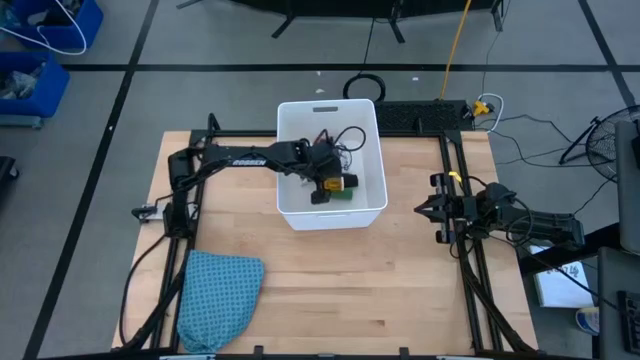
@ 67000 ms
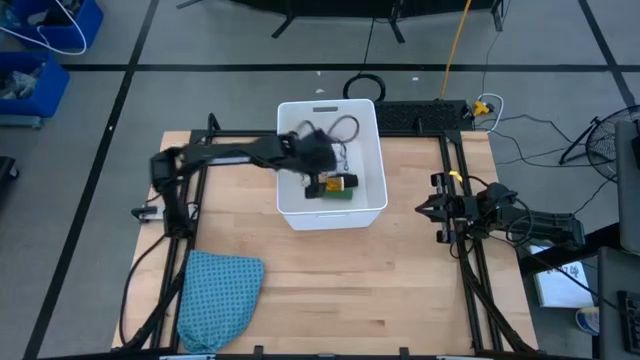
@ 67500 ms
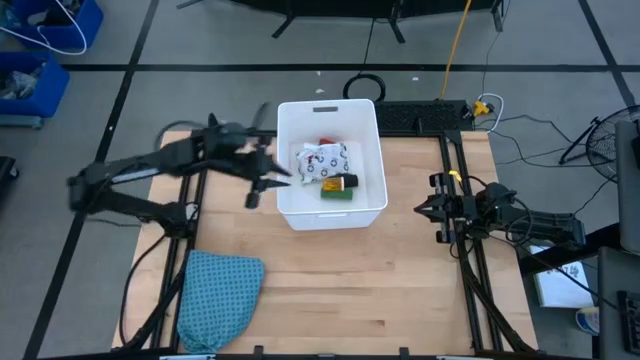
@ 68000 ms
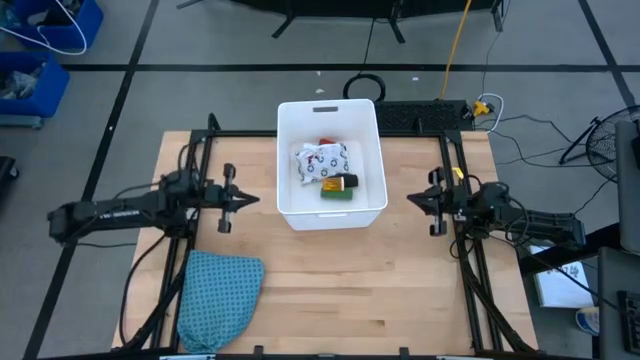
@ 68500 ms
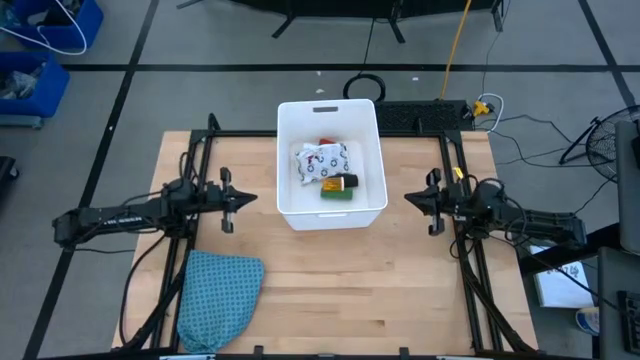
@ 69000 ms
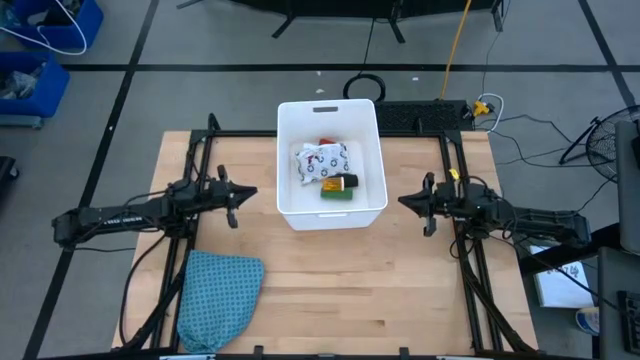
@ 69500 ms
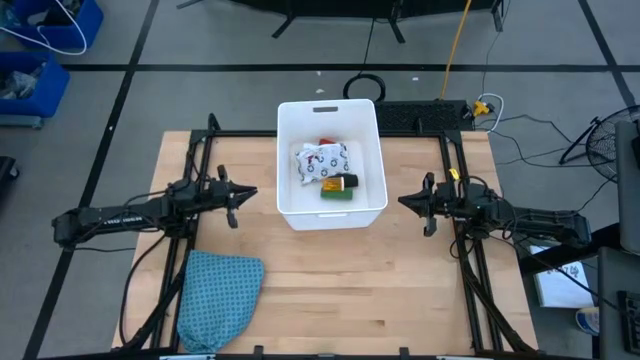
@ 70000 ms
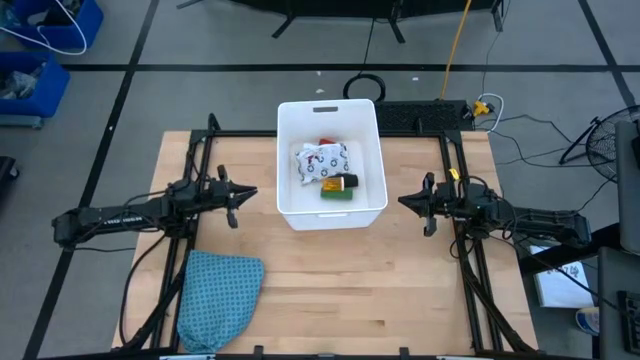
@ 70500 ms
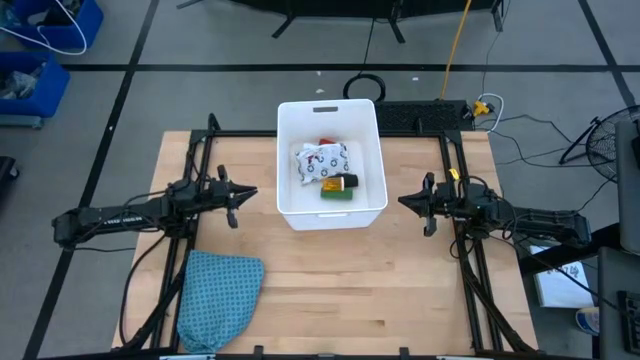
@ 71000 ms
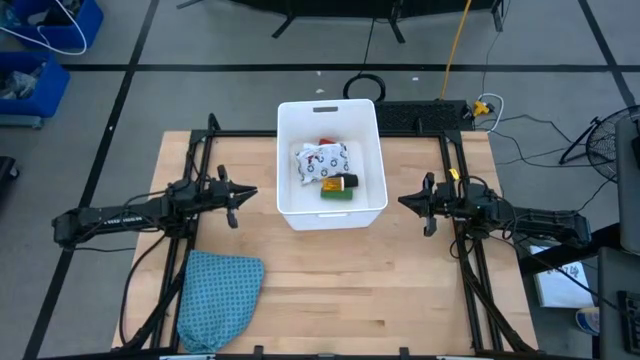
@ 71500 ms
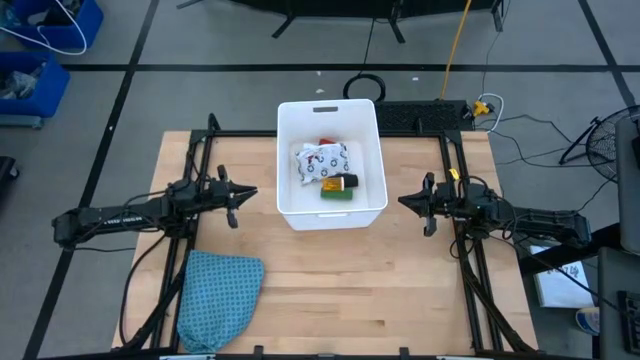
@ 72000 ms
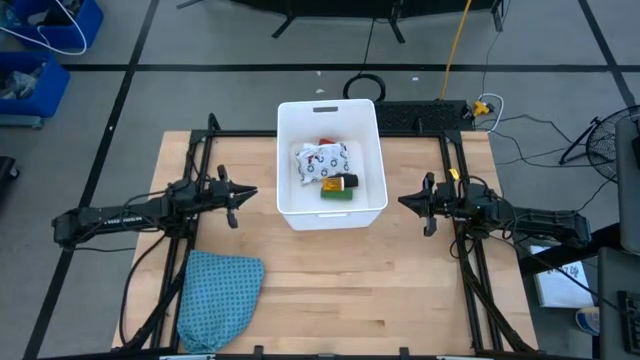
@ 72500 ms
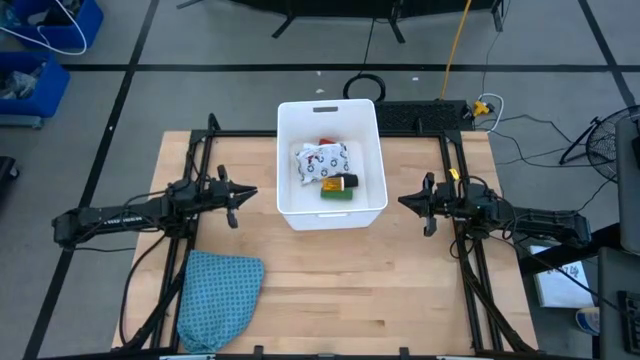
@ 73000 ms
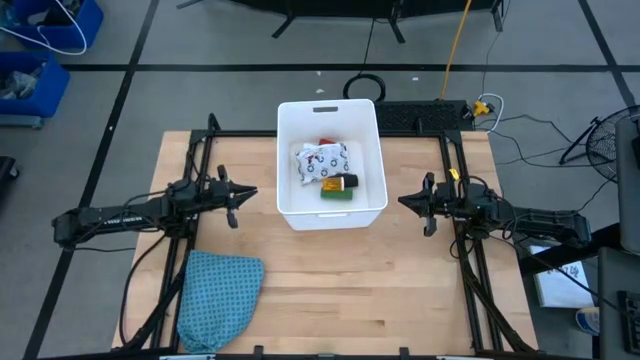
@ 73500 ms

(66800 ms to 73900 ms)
Task: Pick & place medical supplies in basket/bin
Return to Home Position

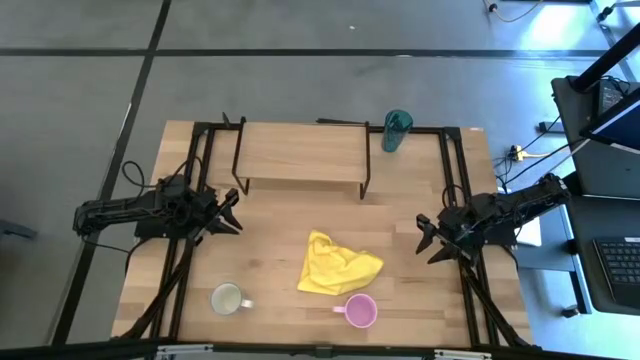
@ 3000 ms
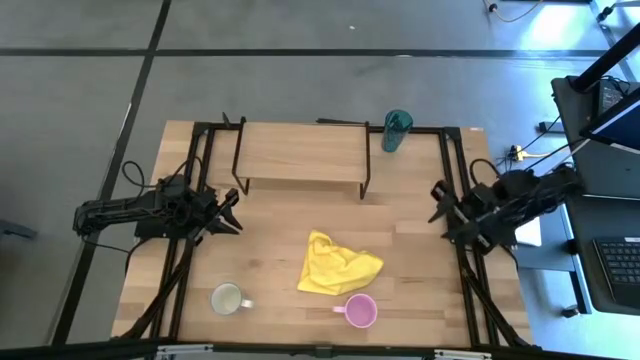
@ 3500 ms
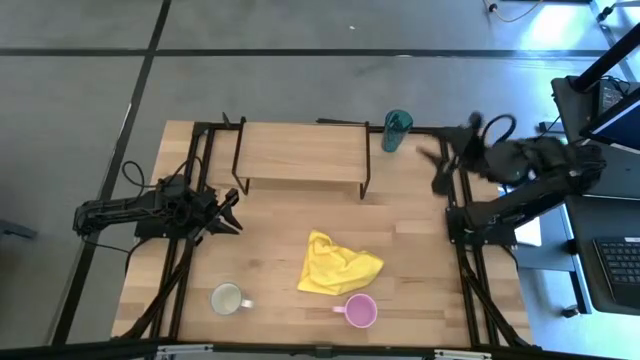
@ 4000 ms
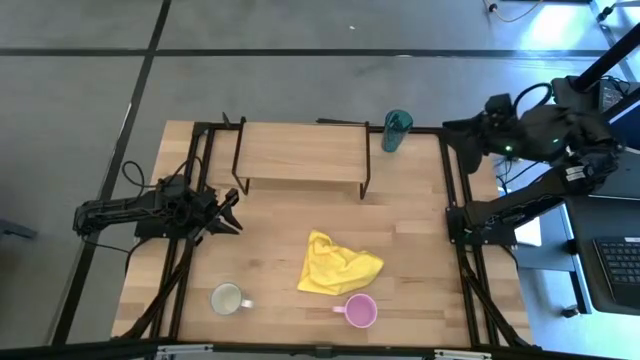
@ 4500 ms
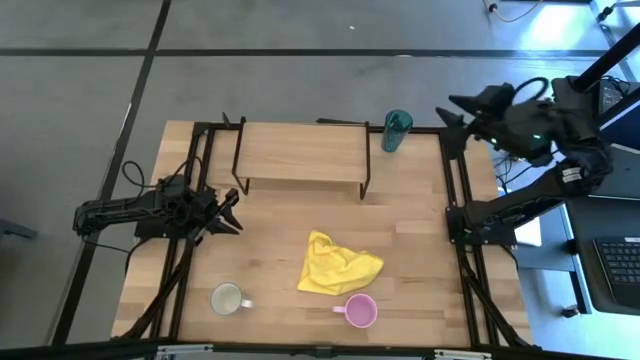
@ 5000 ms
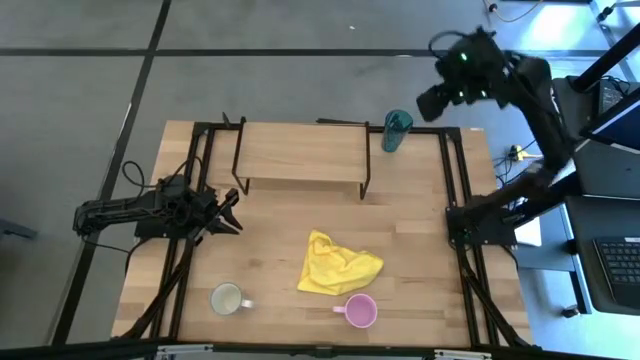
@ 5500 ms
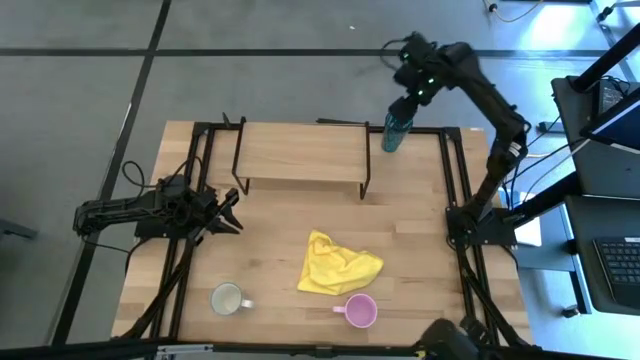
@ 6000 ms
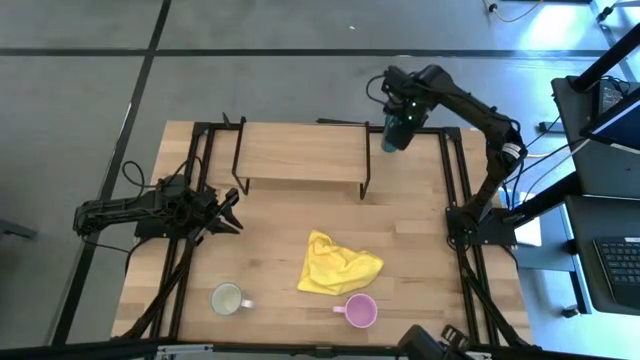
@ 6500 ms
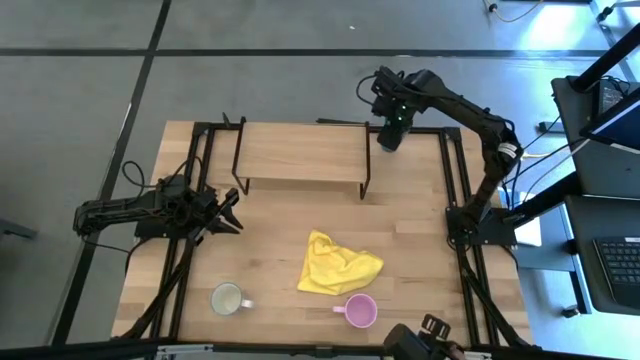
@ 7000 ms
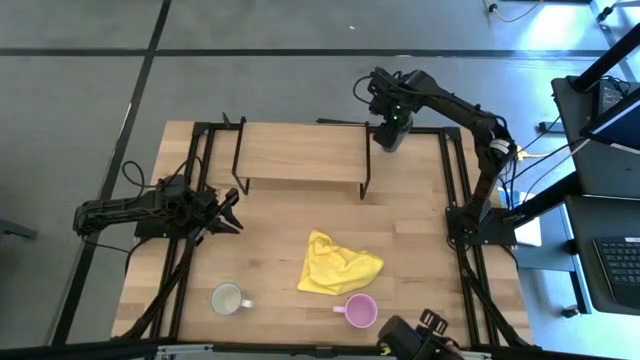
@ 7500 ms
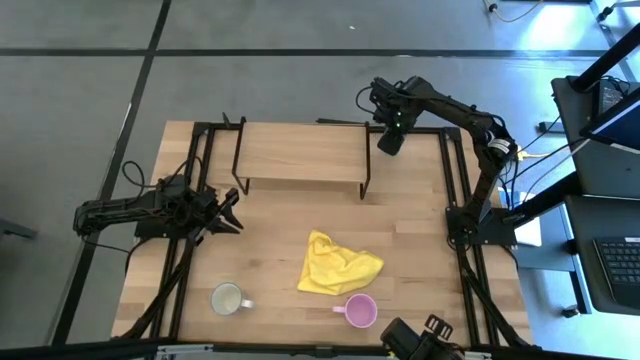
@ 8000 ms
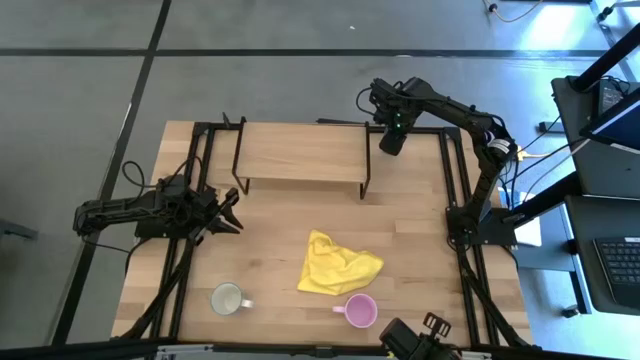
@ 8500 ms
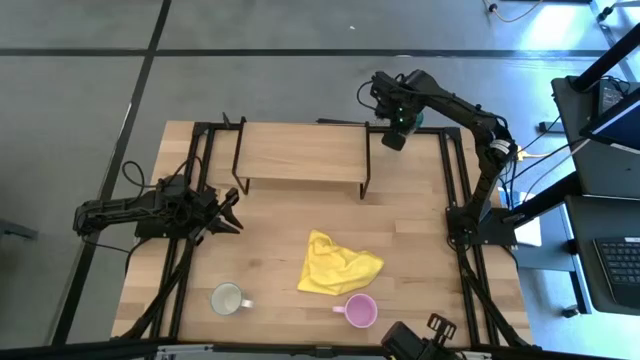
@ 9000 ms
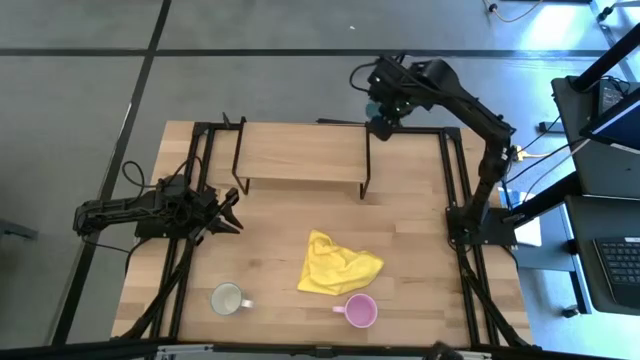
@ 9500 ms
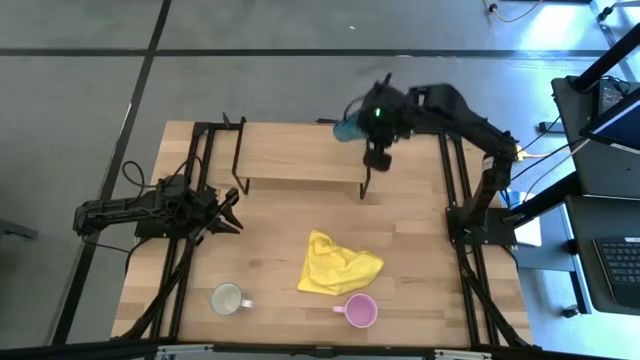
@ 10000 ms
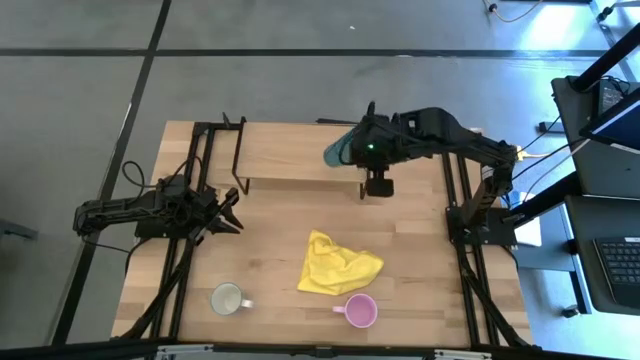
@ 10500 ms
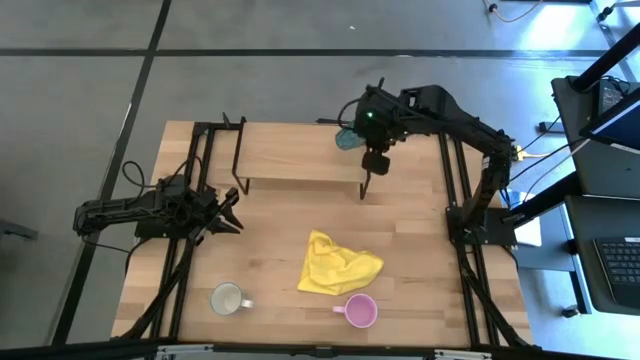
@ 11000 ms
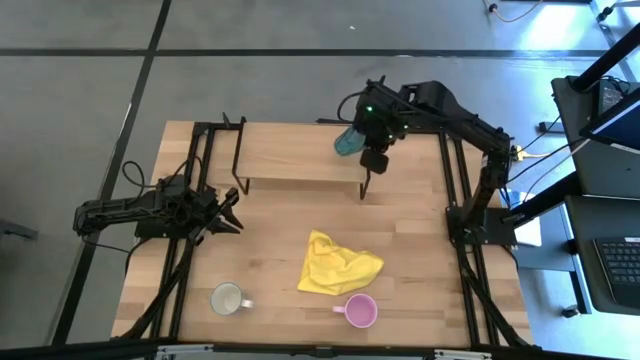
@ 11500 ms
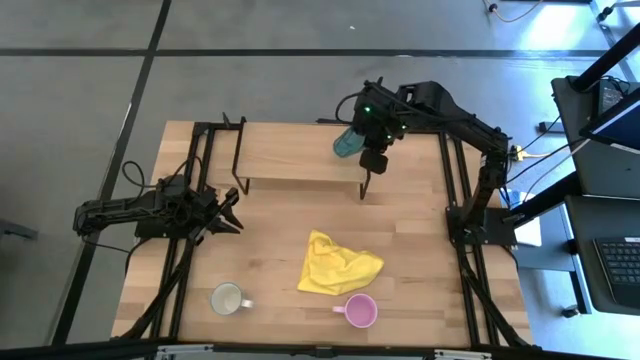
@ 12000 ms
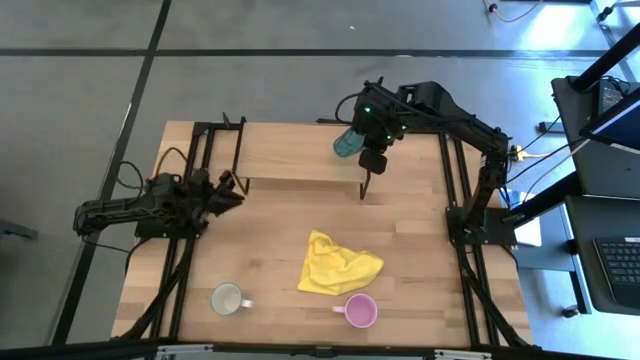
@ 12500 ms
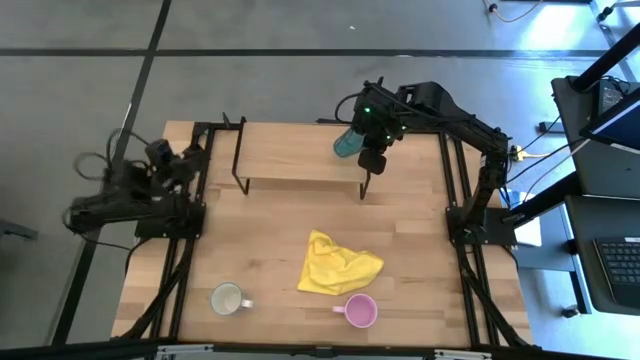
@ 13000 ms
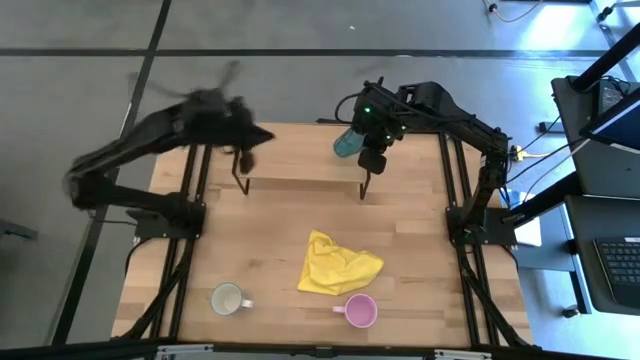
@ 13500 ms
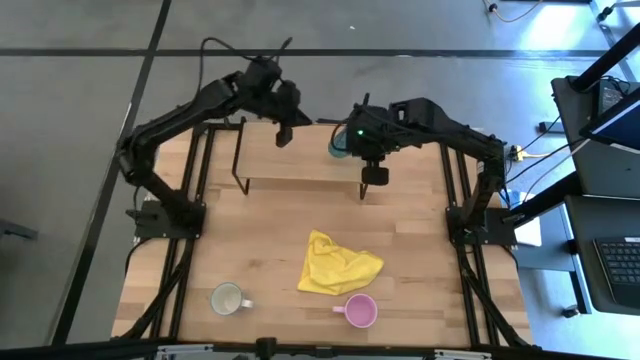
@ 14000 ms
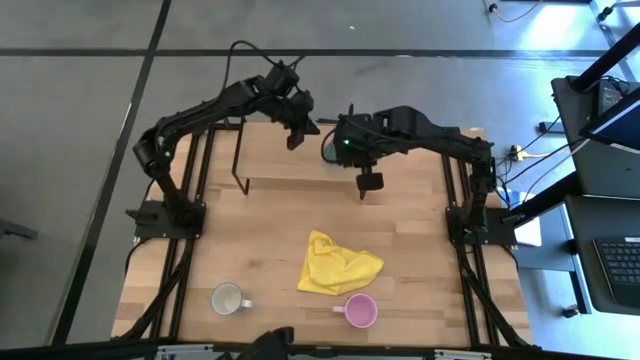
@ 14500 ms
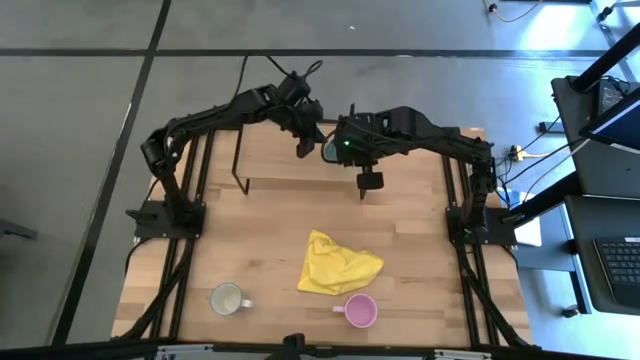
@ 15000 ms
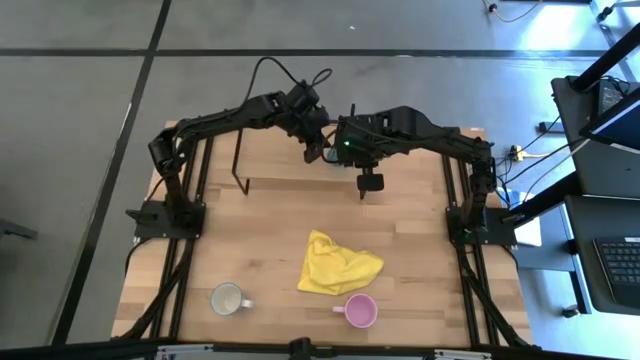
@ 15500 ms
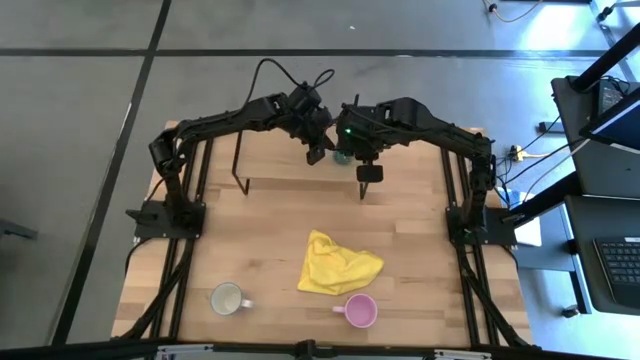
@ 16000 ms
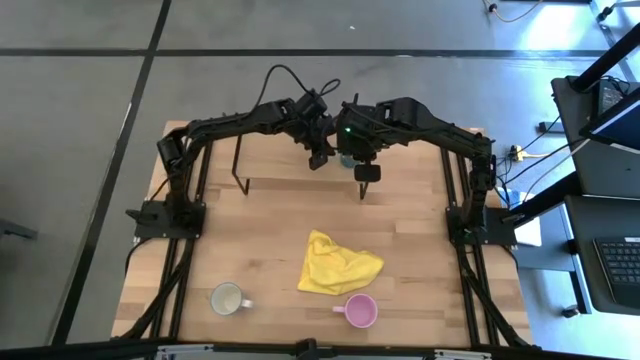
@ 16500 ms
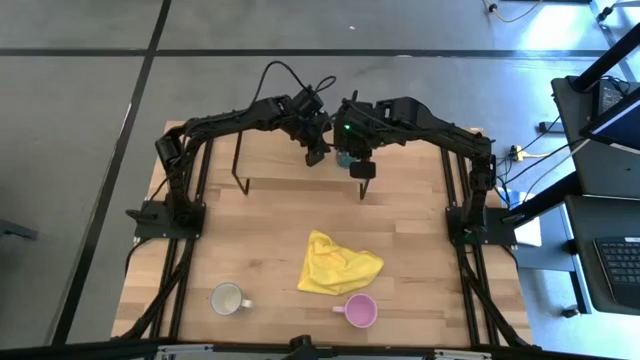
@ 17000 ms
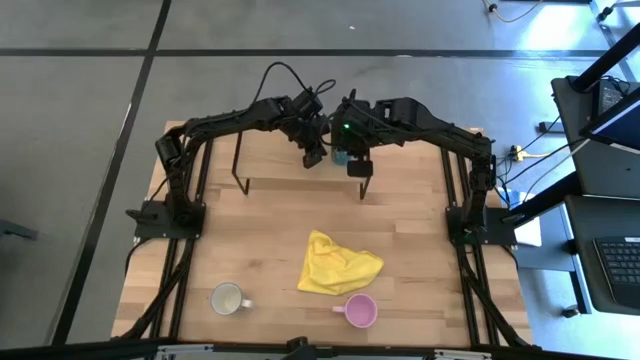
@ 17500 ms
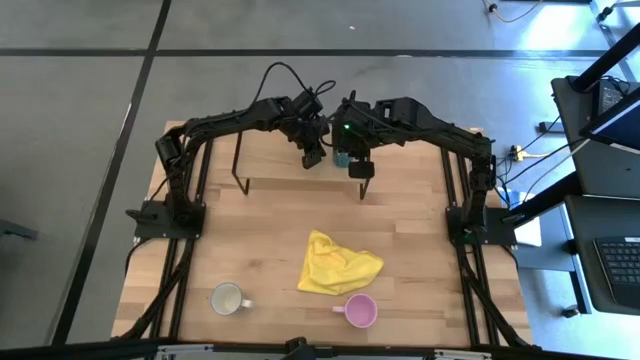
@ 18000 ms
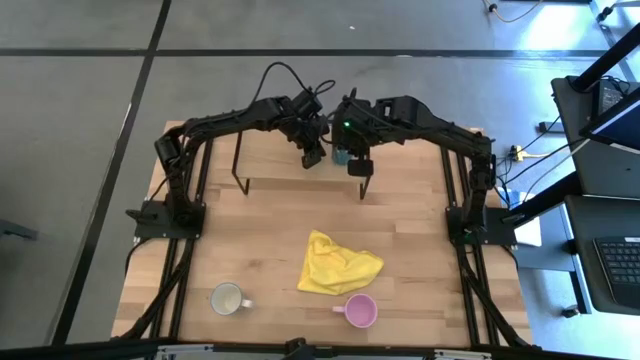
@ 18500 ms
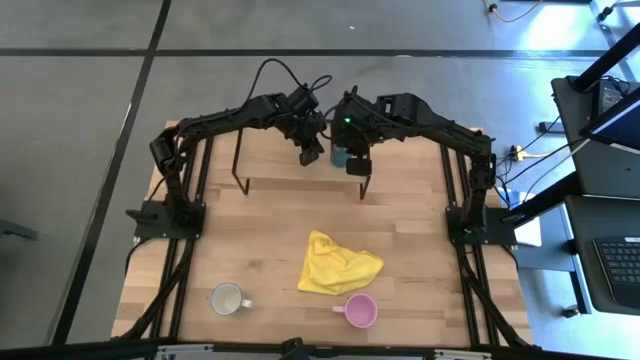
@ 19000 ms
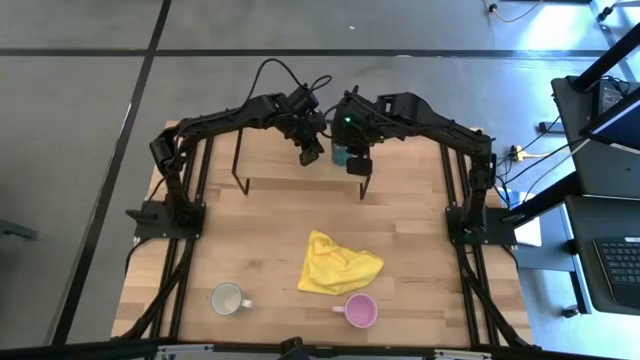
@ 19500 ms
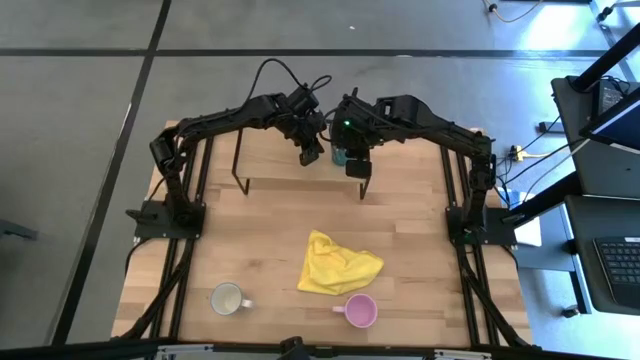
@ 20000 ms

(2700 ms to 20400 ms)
Task: Stack small to large cups/mugs on shelf
Put the blue cup on the shelf
